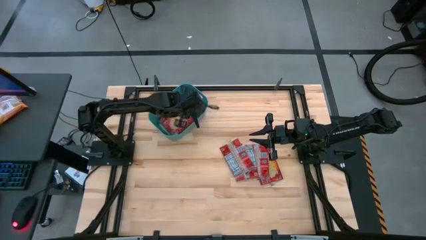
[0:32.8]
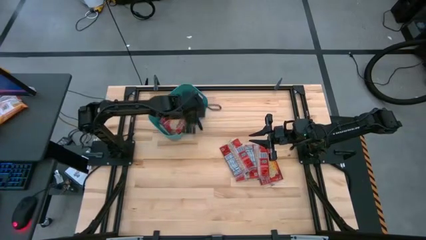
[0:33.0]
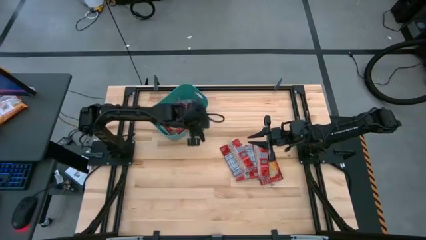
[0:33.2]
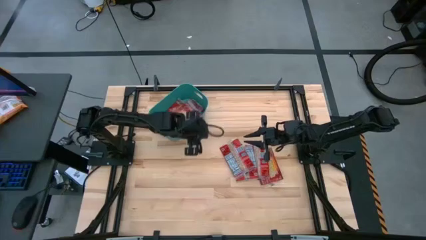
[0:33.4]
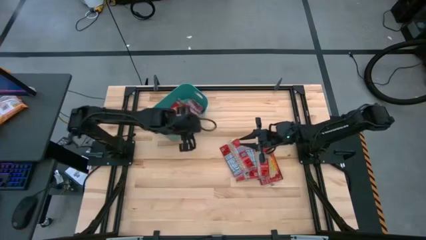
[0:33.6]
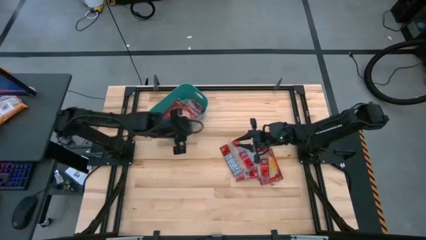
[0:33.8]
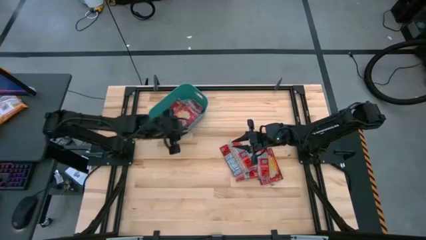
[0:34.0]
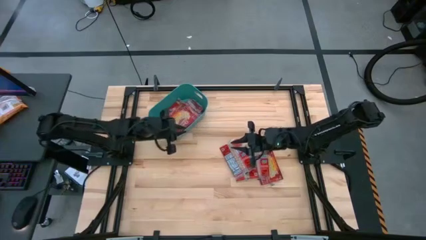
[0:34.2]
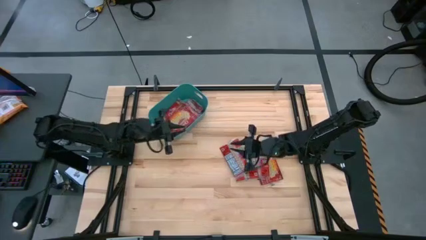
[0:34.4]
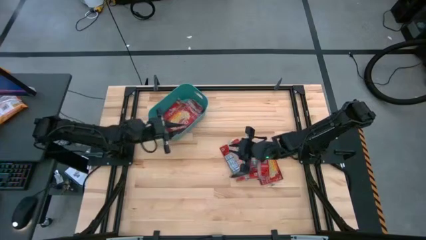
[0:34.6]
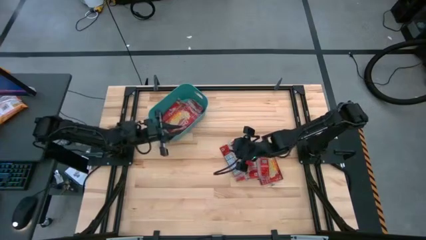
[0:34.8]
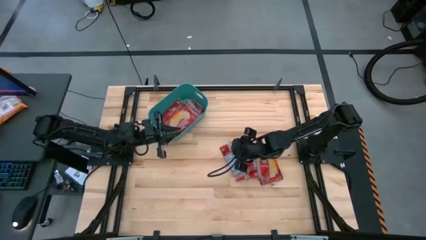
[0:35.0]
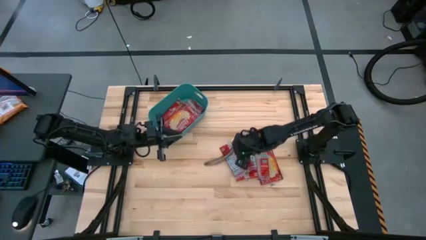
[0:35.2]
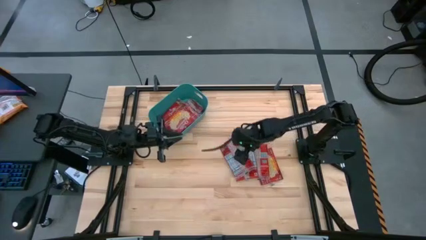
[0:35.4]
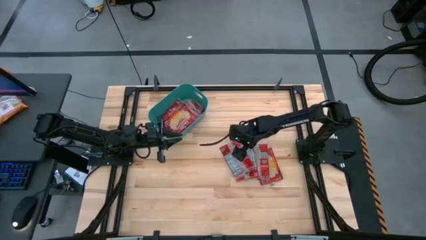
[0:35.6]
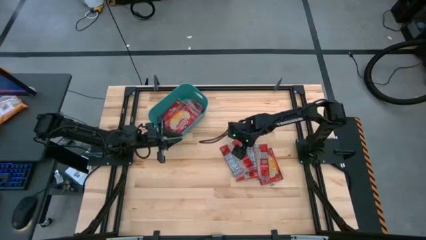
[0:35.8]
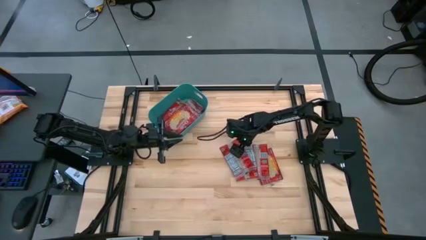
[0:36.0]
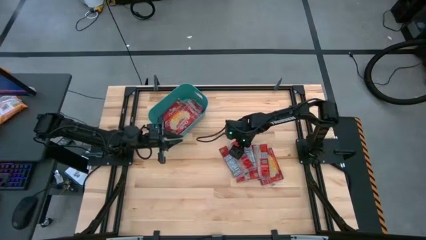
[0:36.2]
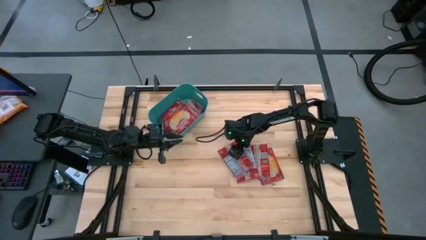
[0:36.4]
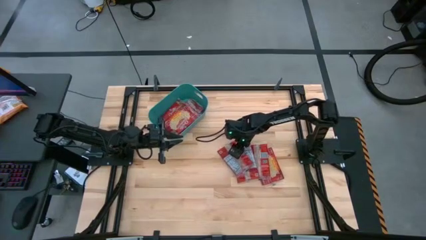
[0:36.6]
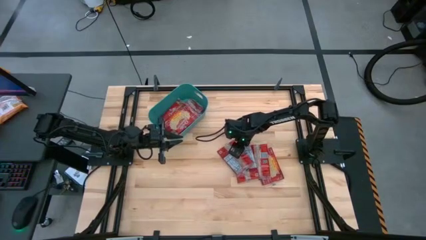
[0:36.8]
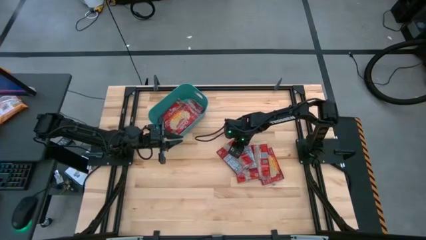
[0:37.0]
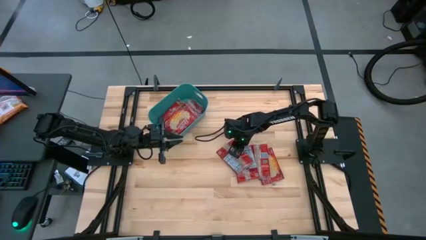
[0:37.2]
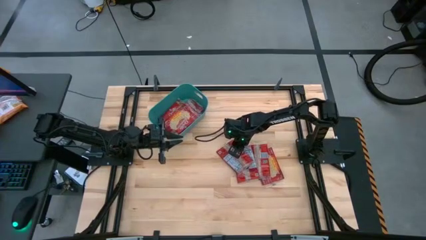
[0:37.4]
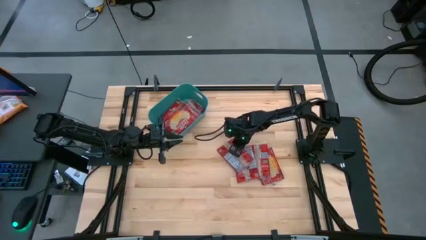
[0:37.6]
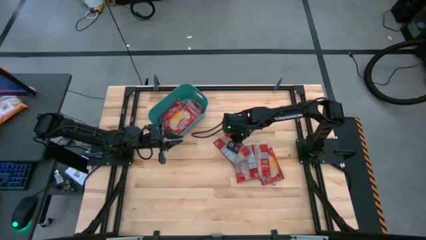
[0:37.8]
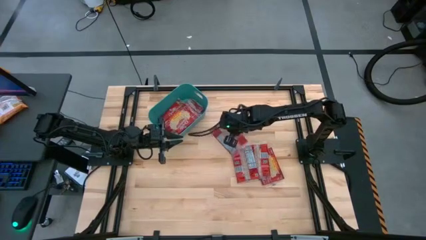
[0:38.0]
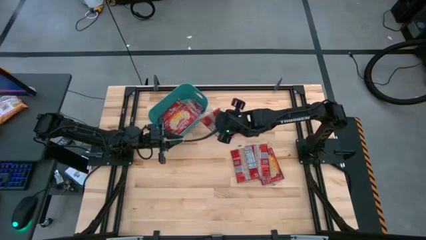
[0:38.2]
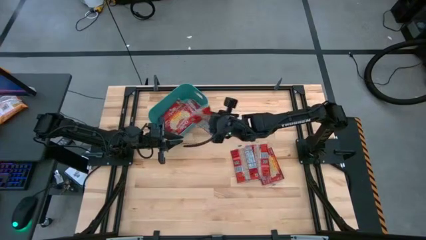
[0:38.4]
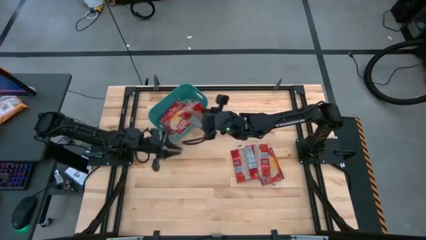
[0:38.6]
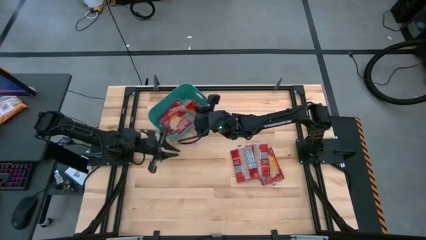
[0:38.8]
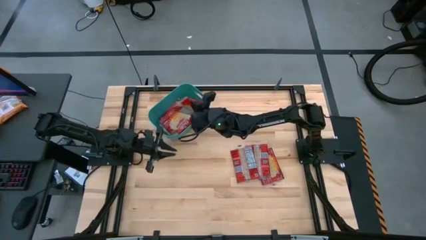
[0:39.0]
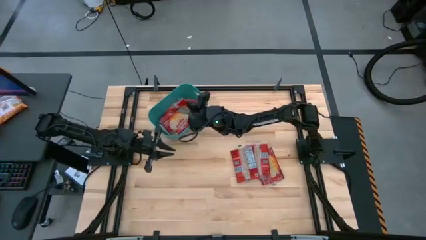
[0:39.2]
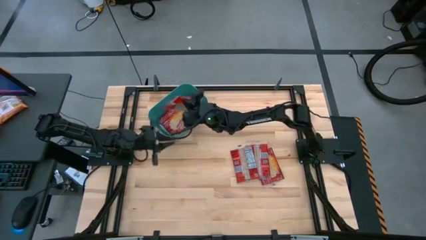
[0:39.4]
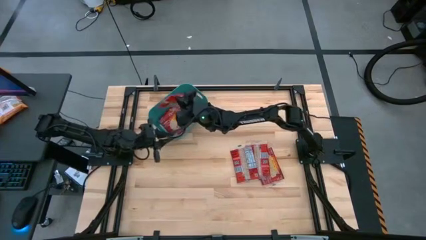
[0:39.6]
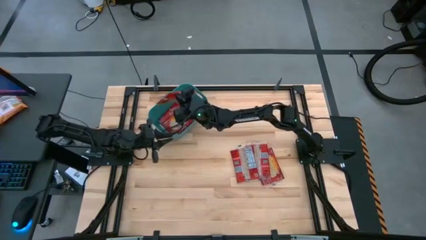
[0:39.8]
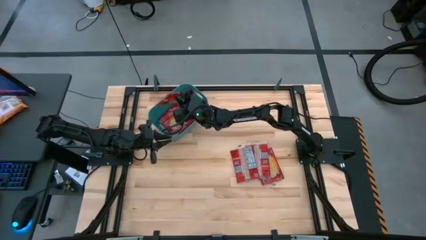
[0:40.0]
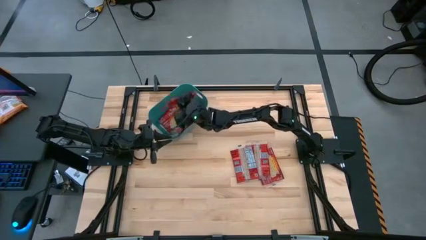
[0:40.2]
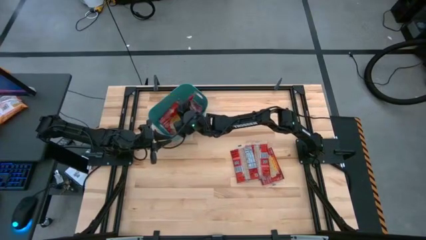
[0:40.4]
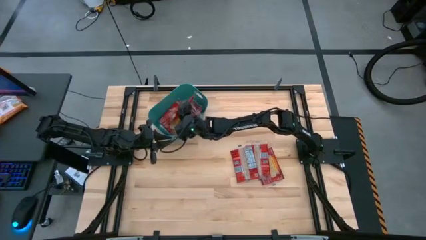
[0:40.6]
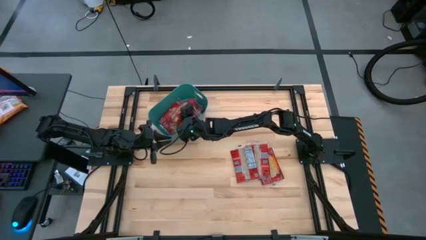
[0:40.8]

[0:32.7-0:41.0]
Task: Sort popcorn bags into baskets
Put the red popcorn bag into the blue bin

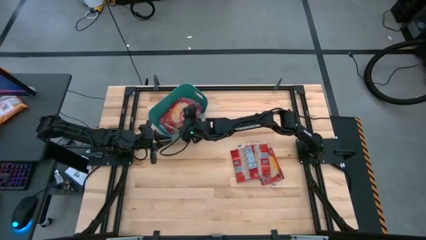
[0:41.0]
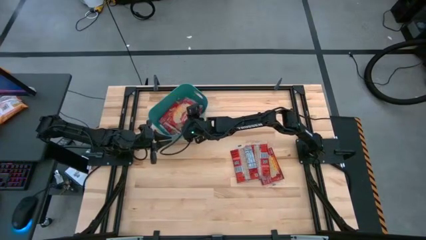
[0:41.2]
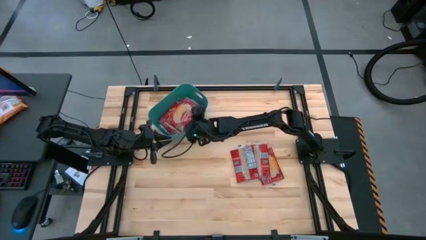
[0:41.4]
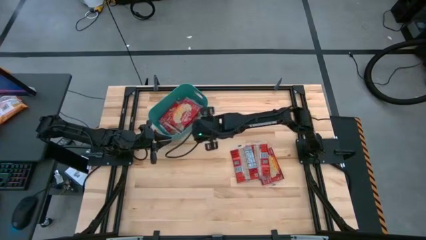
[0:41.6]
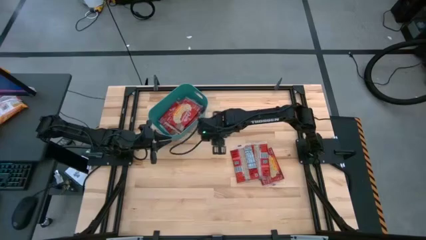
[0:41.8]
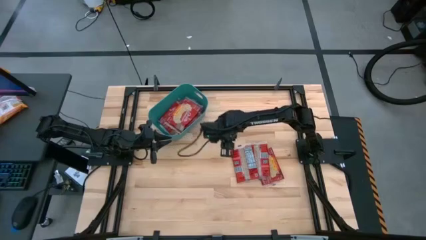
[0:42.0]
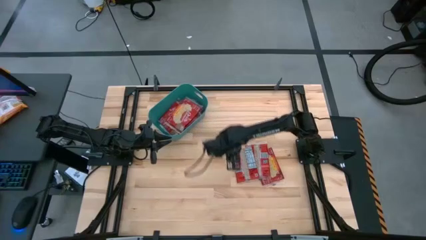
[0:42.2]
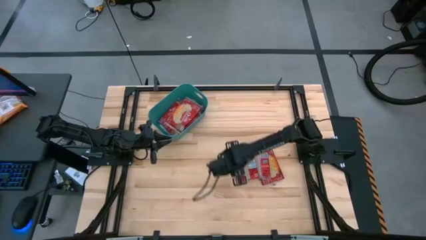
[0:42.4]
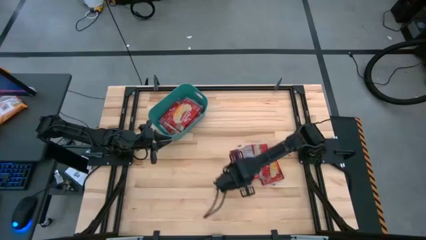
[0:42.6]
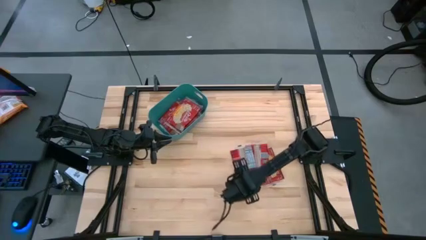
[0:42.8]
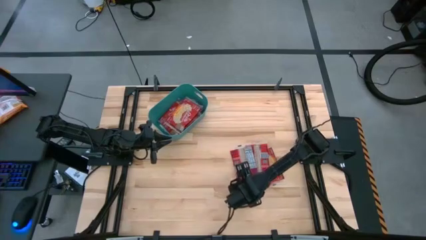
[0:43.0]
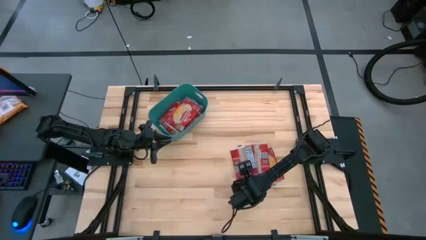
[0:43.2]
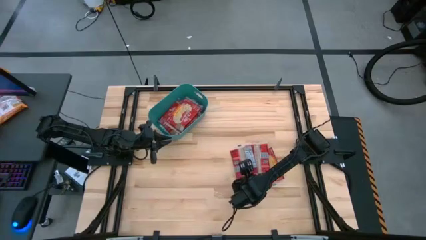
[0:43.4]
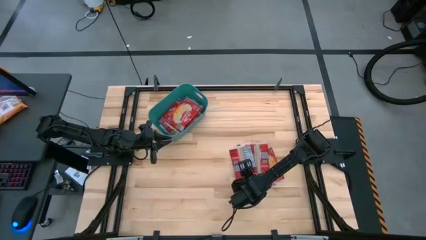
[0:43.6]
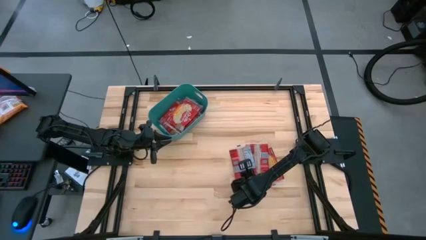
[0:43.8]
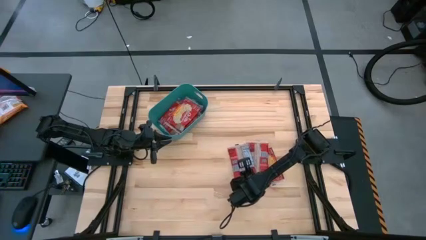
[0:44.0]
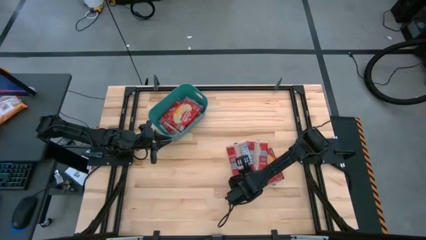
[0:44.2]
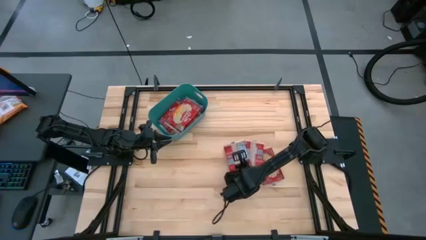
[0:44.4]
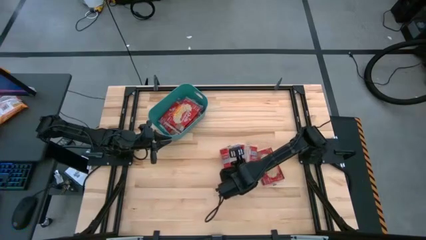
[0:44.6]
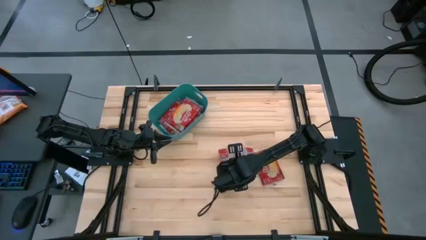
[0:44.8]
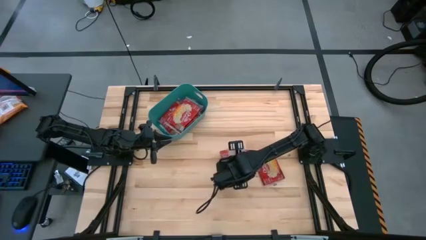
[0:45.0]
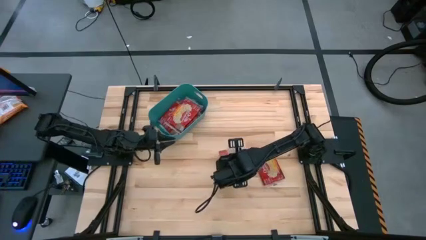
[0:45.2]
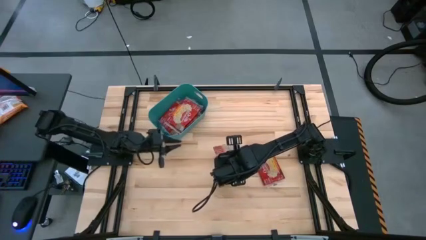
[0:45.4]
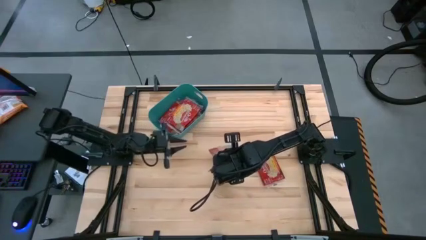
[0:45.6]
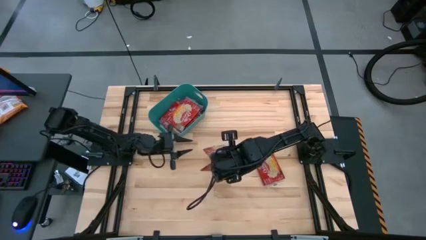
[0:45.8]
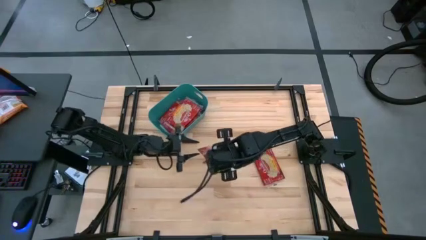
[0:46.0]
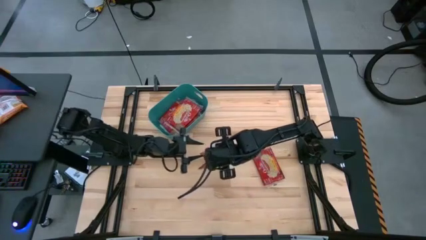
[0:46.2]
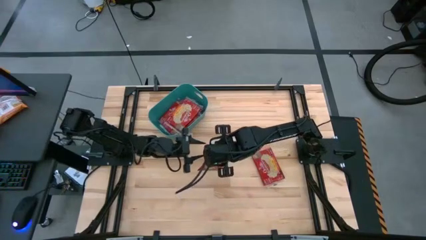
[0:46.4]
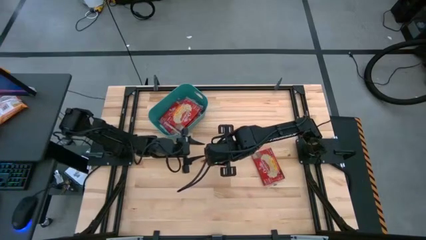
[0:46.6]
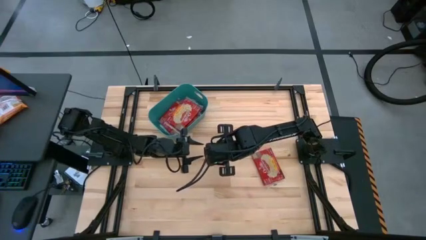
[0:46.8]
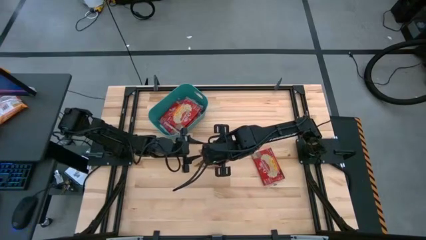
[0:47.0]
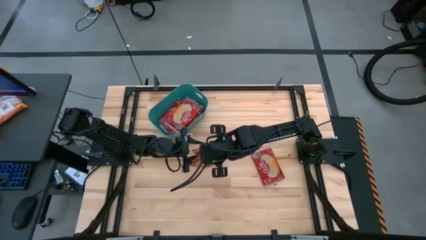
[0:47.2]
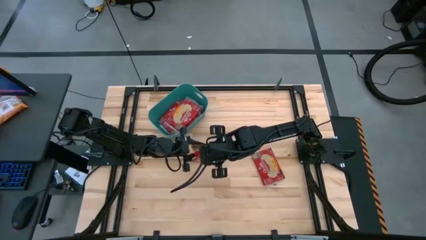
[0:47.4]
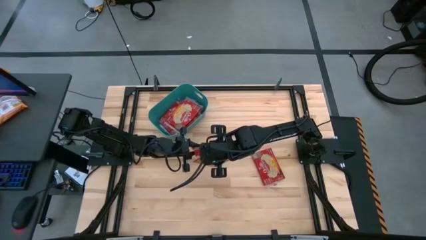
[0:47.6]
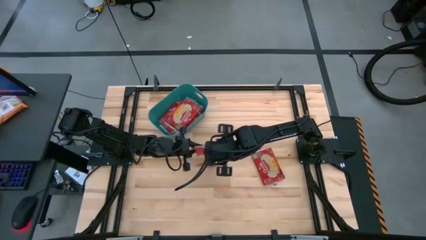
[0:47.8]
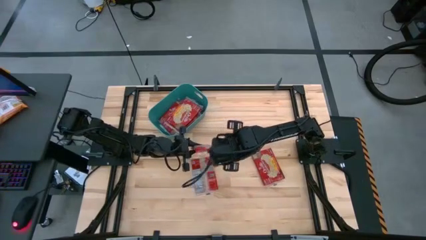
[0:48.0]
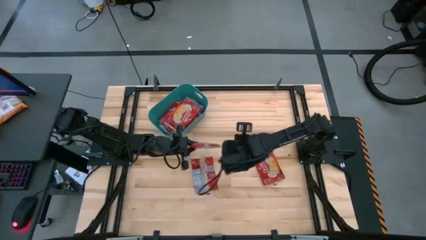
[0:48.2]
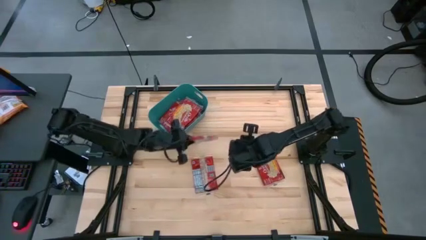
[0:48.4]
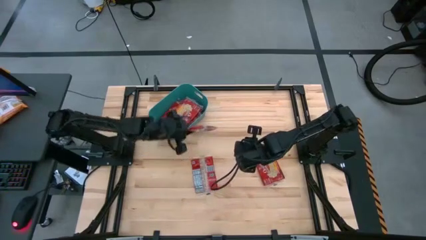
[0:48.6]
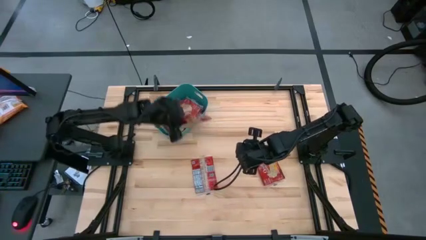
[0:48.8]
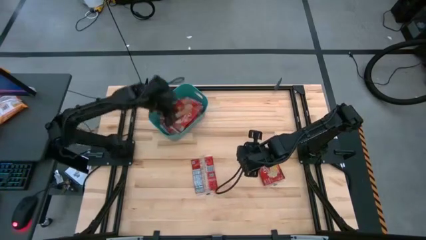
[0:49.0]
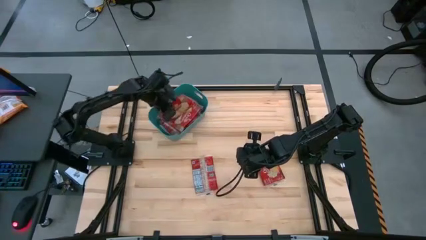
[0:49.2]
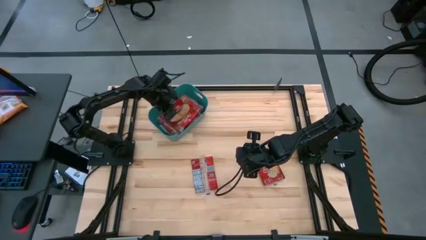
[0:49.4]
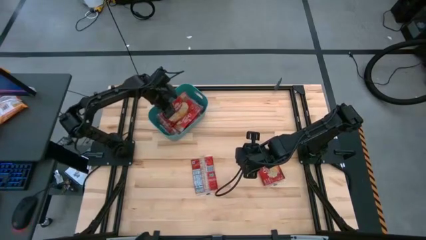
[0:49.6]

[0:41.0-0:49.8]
Put the red popcorn bag into the blue bin
